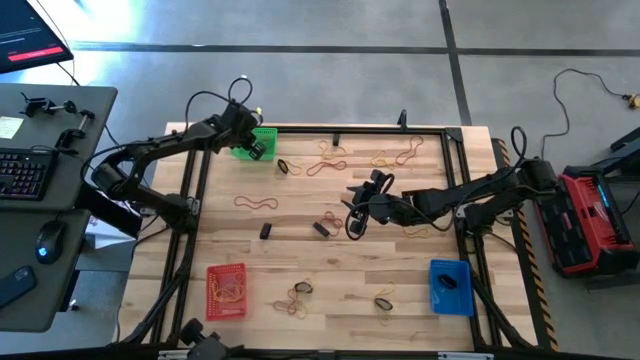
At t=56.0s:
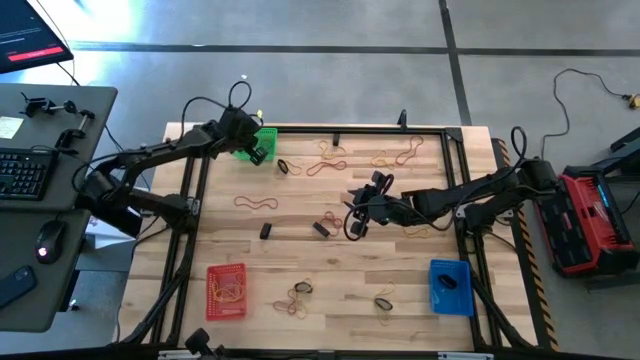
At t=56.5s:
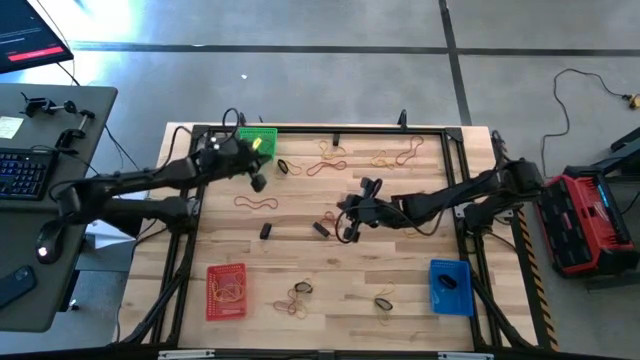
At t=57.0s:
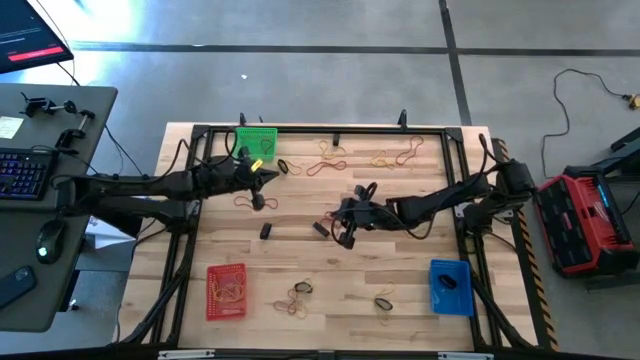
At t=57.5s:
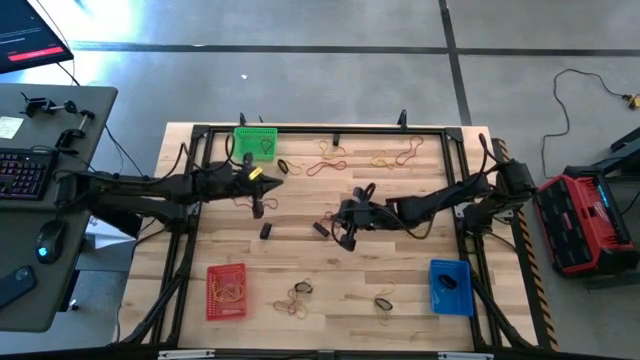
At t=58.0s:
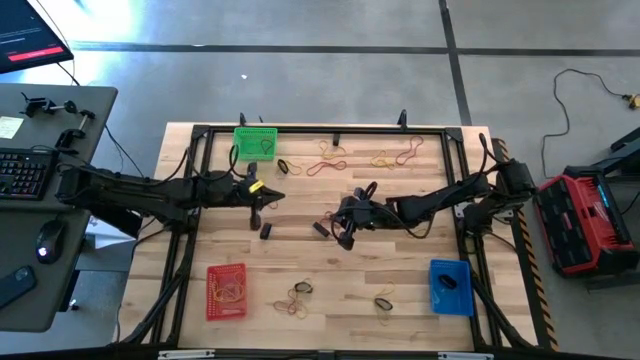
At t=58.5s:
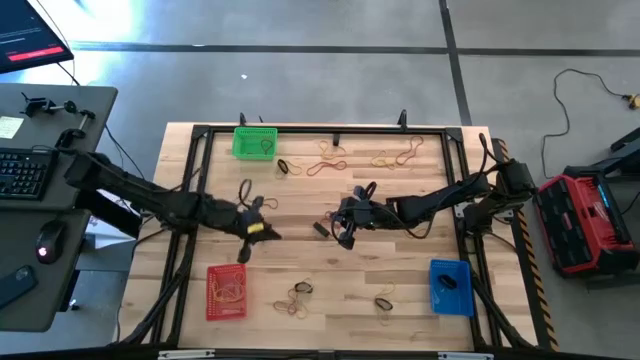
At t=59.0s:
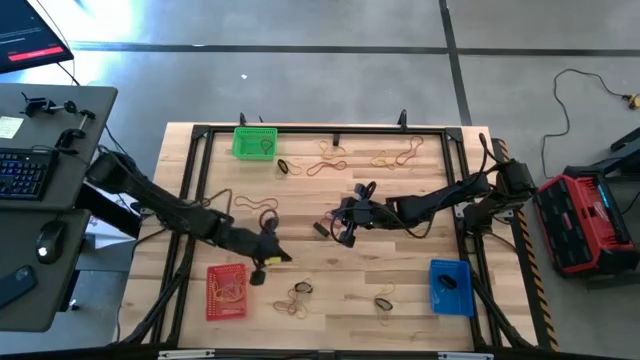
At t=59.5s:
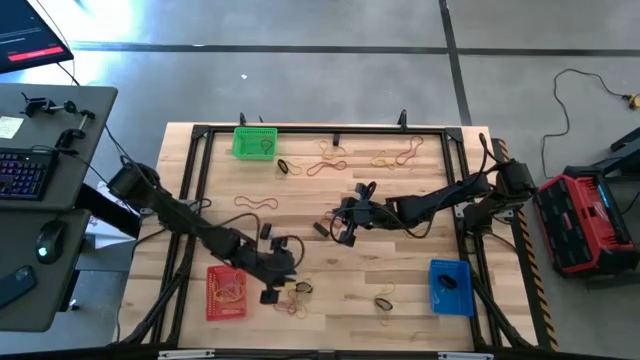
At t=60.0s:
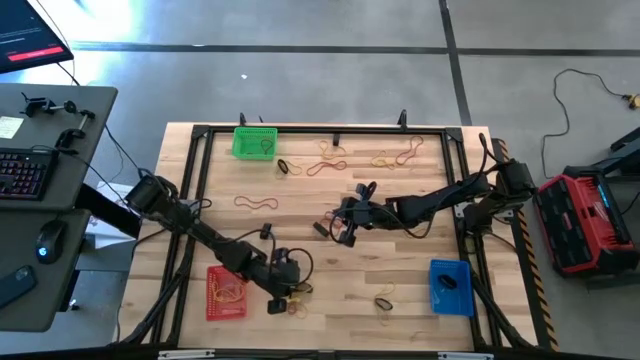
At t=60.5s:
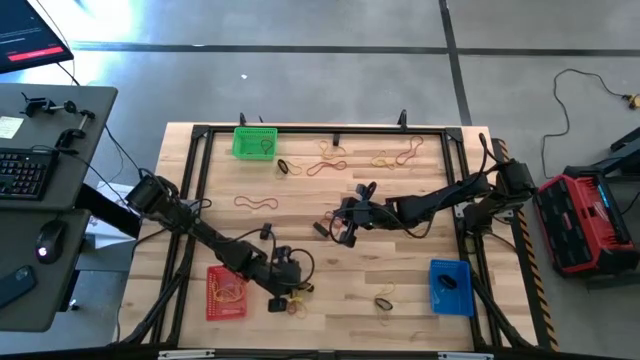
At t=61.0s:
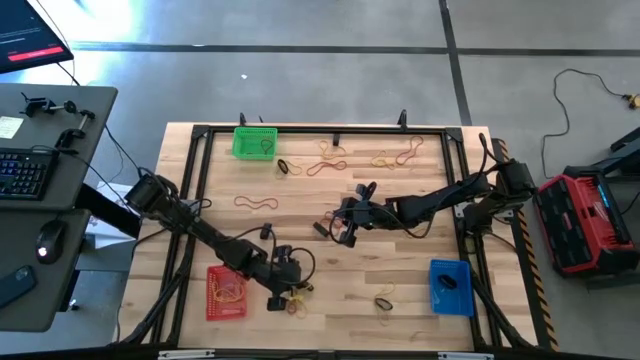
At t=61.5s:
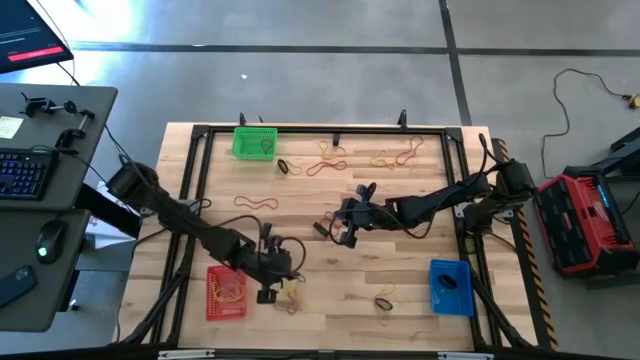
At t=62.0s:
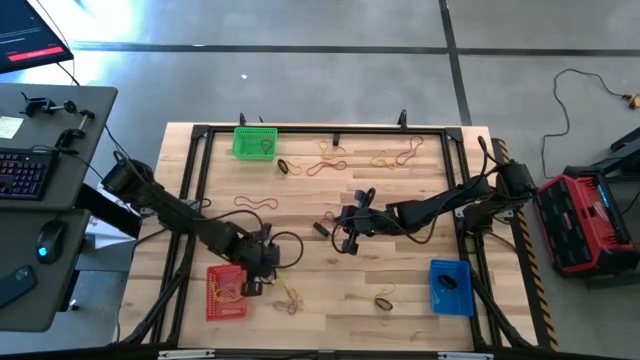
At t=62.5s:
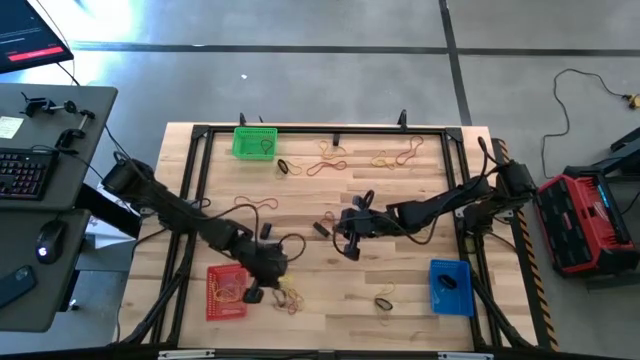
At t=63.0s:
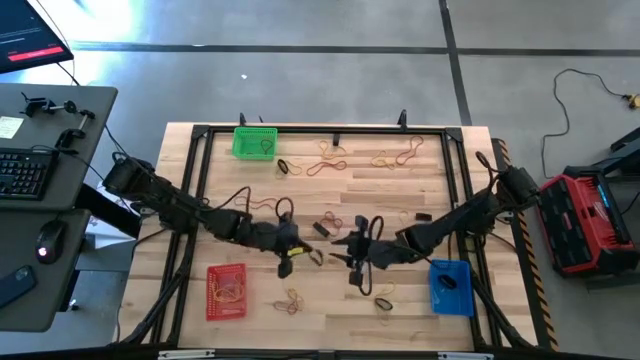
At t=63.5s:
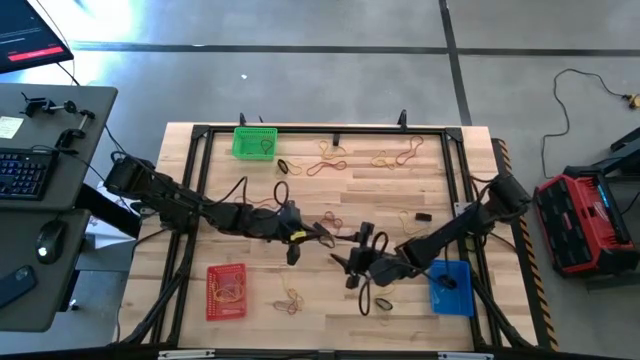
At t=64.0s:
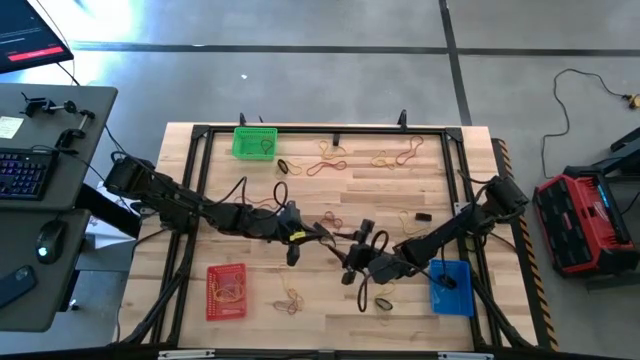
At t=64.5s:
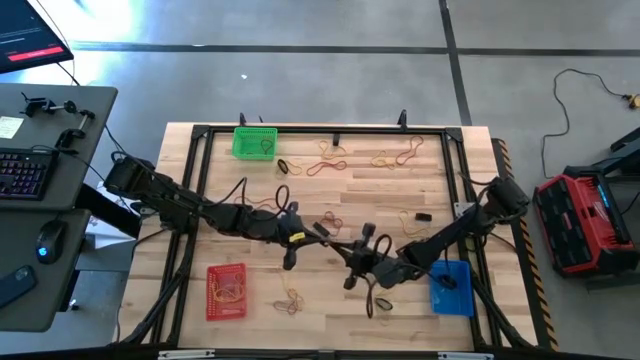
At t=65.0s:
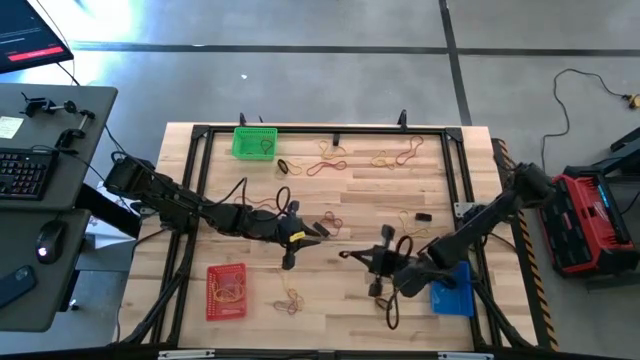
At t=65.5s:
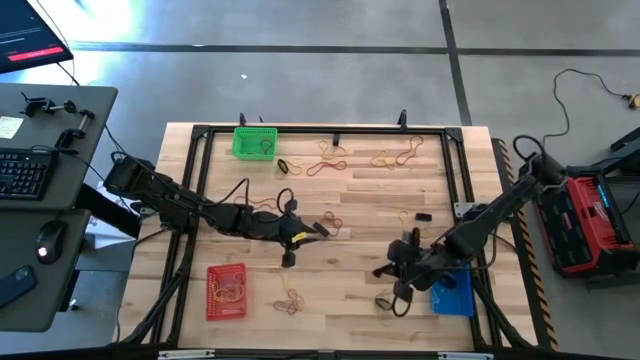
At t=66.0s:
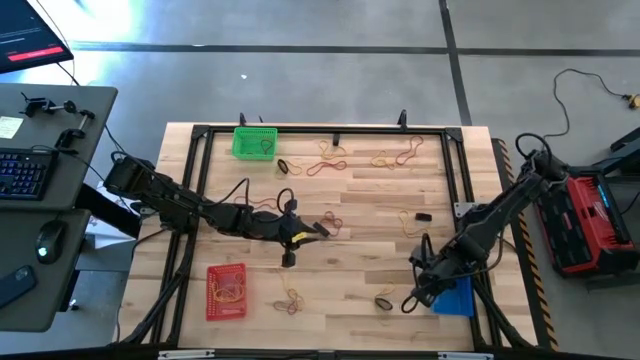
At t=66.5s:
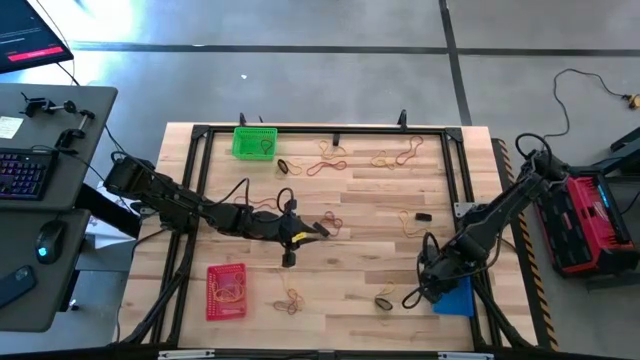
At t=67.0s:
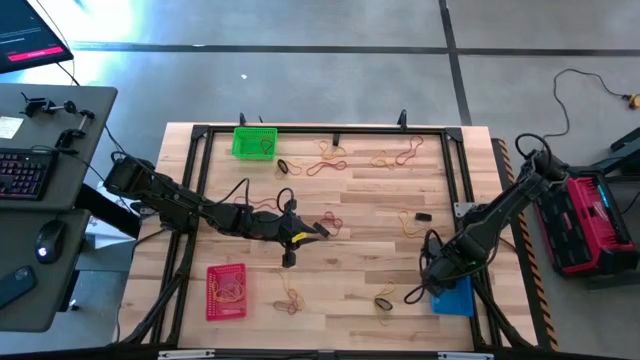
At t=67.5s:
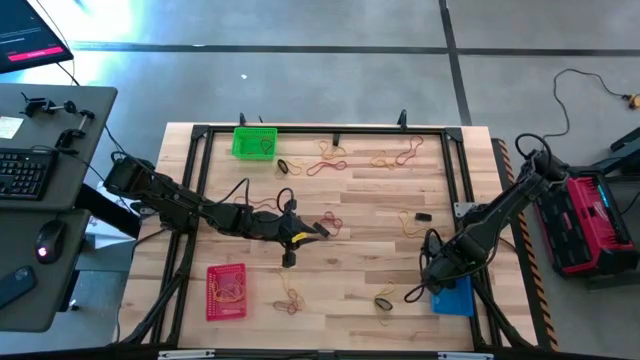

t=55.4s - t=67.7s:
Task: Sort rubber bands into baskets
Put the black rubber band into the blue bin

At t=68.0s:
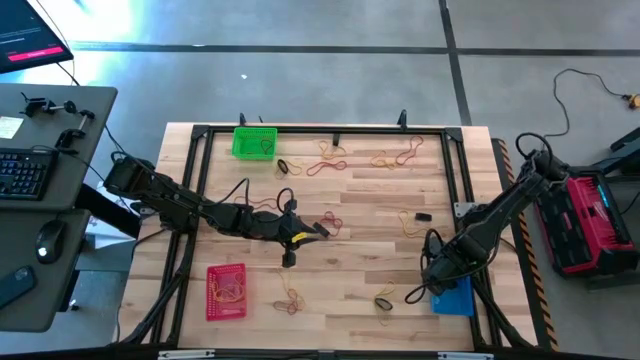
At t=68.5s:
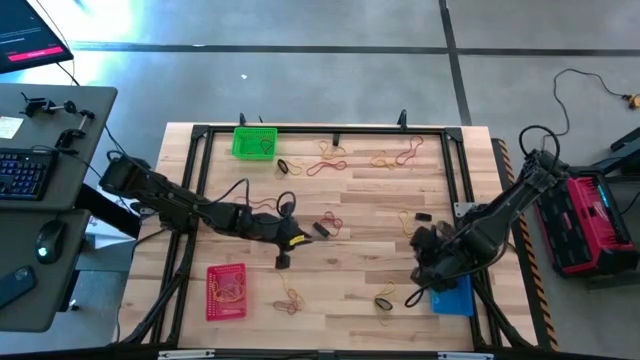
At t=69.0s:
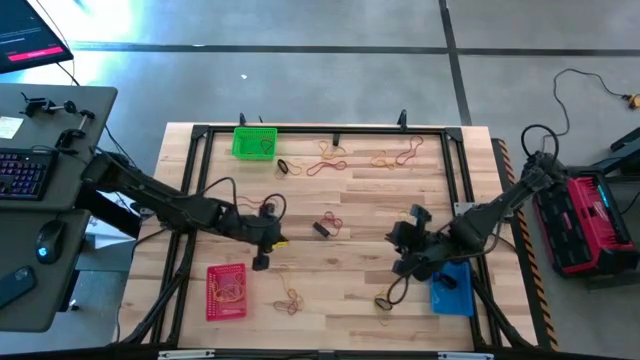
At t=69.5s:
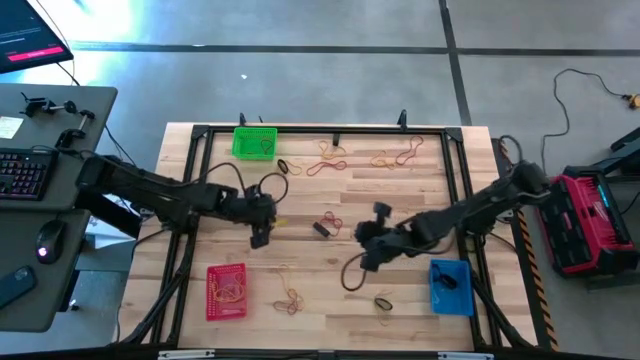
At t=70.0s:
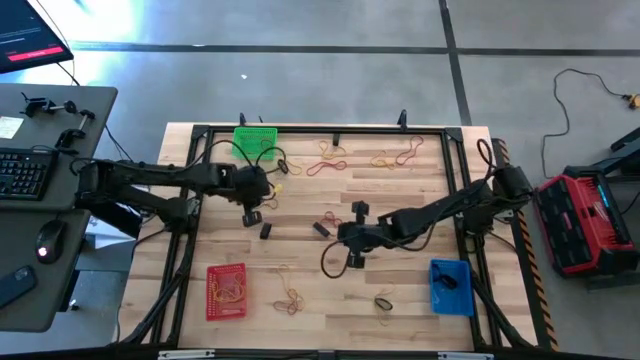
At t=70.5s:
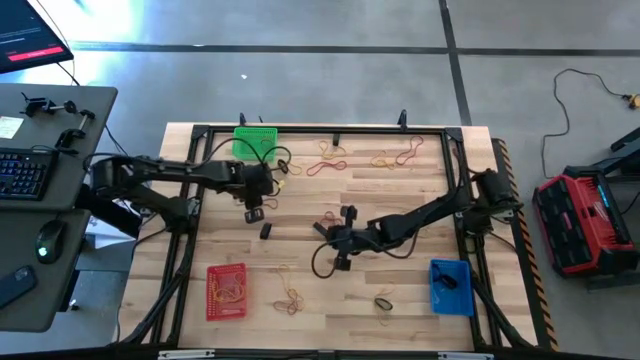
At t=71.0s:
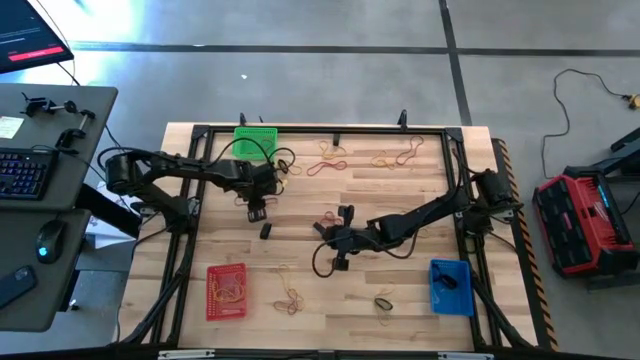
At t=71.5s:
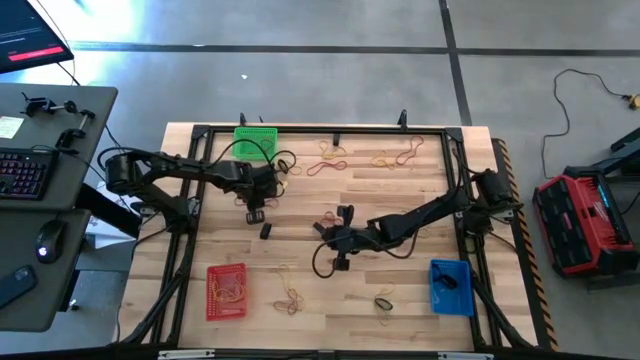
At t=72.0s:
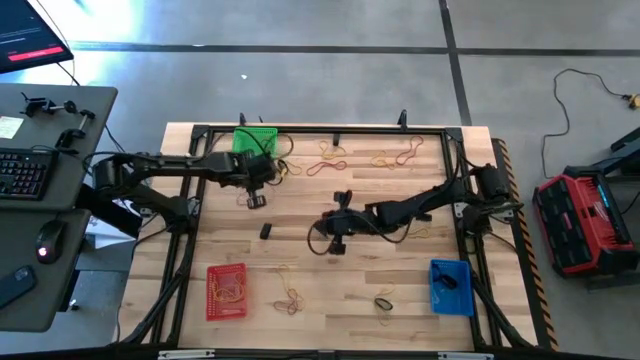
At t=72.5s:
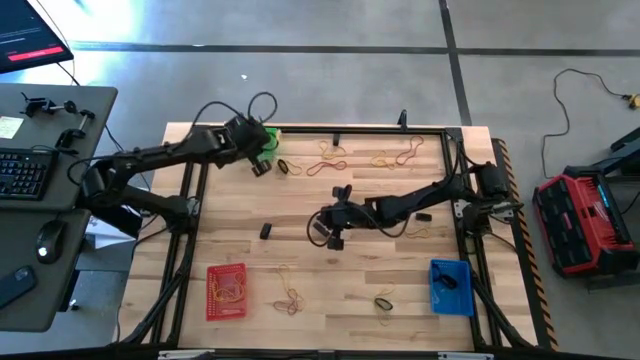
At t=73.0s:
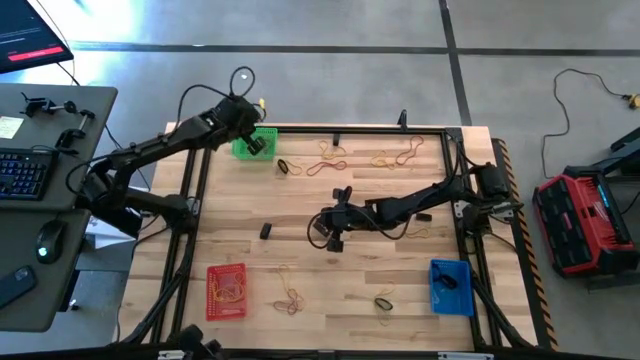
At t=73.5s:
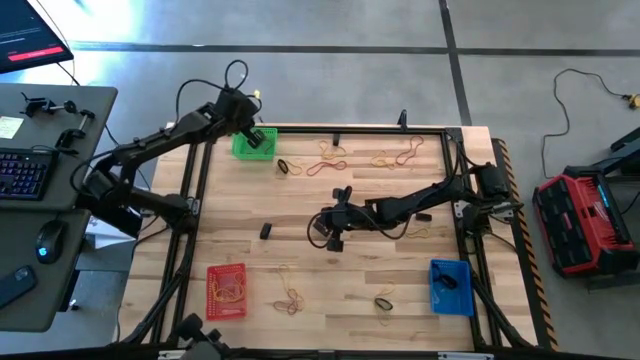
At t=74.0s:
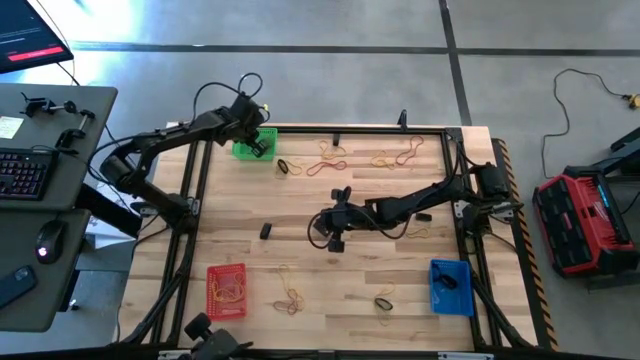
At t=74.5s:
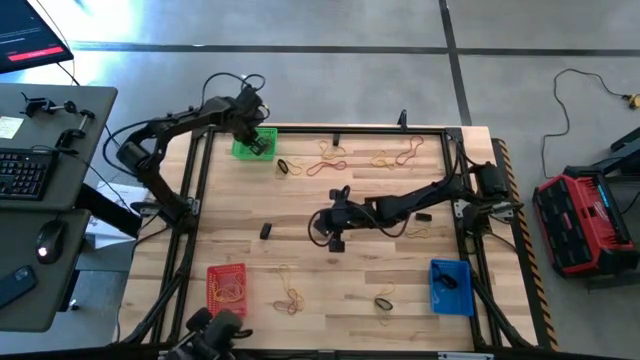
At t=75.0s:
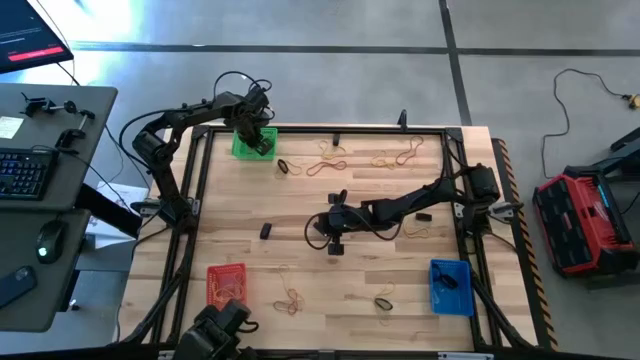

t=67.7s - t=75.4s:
Put the red rubber band into the green bin
